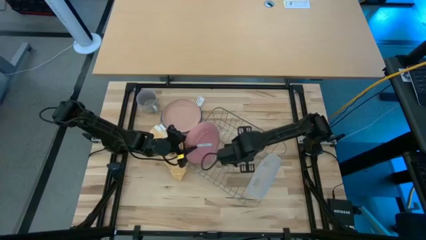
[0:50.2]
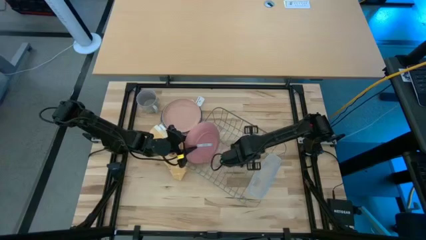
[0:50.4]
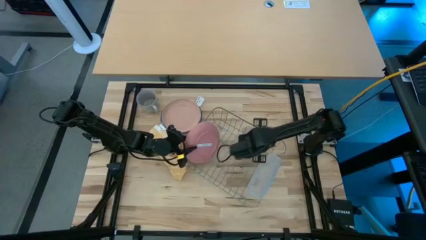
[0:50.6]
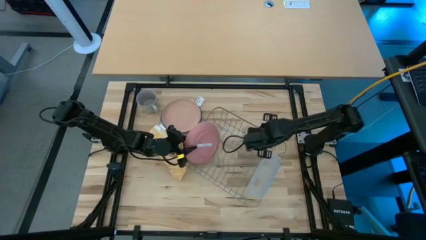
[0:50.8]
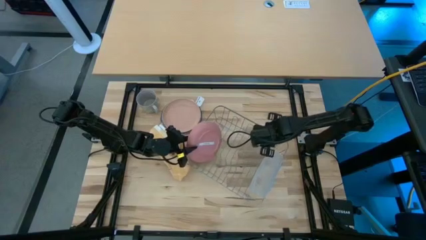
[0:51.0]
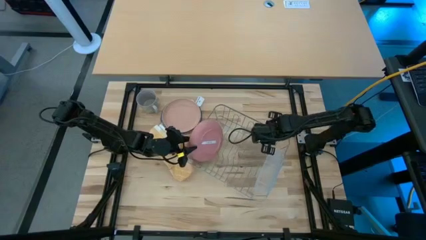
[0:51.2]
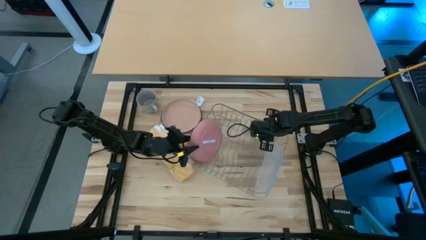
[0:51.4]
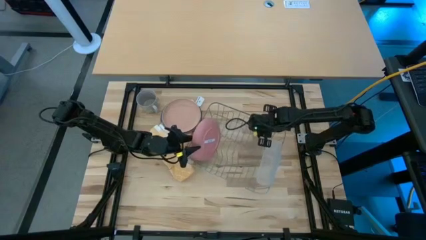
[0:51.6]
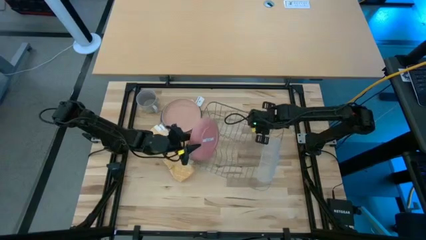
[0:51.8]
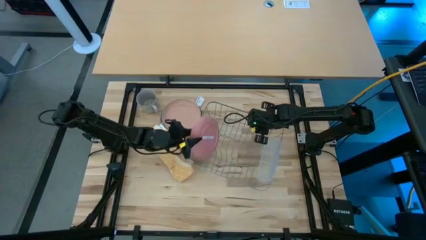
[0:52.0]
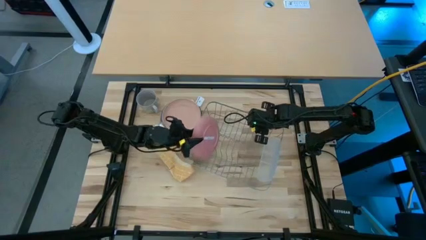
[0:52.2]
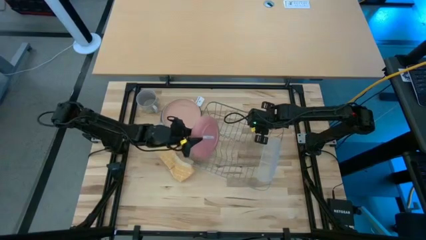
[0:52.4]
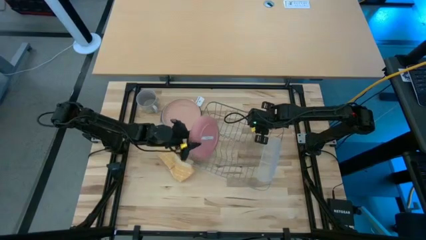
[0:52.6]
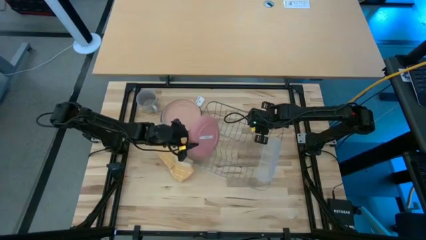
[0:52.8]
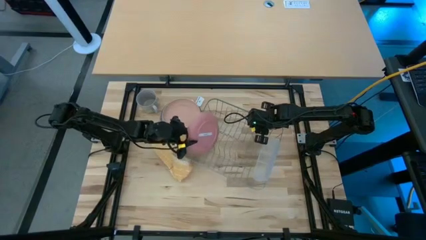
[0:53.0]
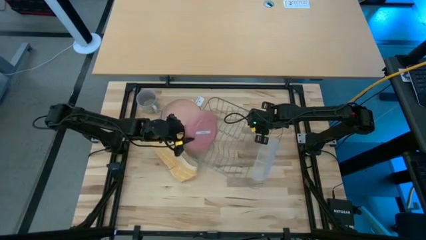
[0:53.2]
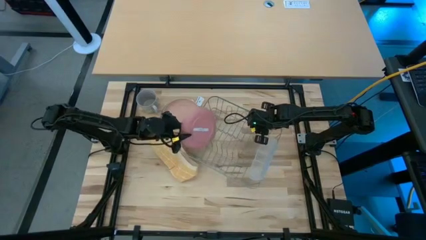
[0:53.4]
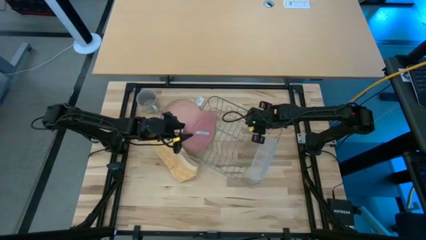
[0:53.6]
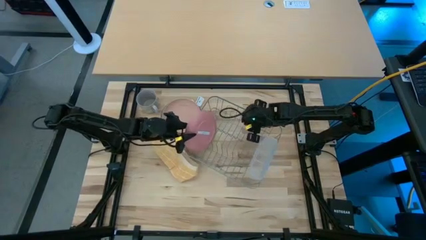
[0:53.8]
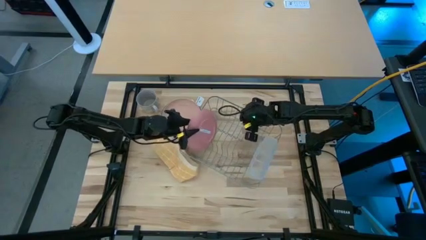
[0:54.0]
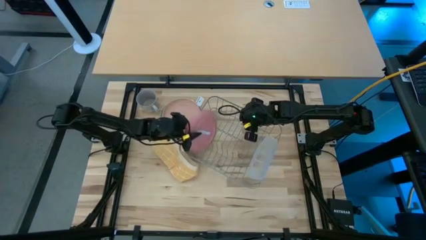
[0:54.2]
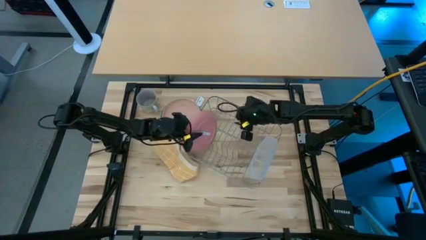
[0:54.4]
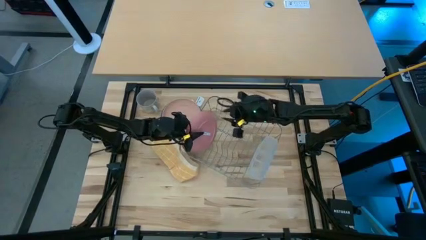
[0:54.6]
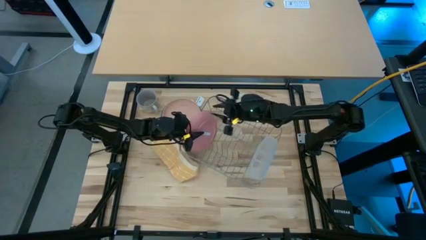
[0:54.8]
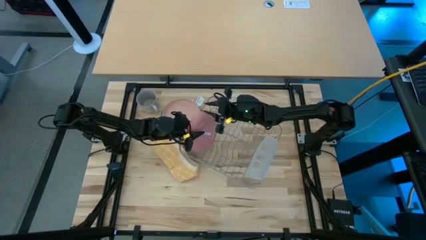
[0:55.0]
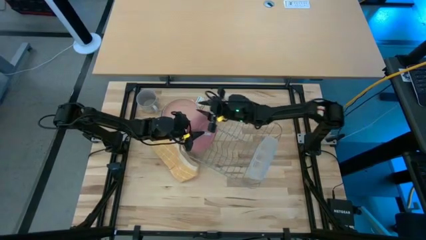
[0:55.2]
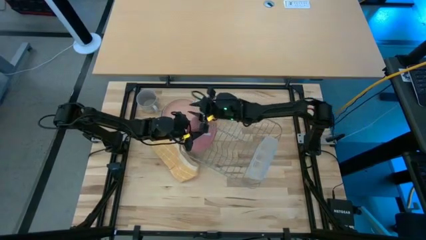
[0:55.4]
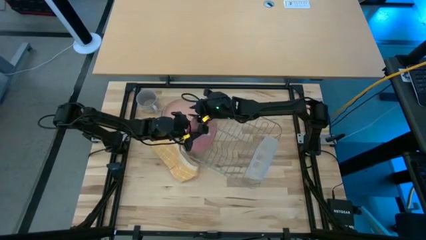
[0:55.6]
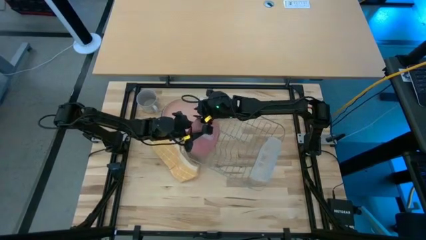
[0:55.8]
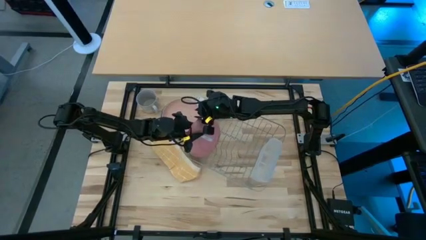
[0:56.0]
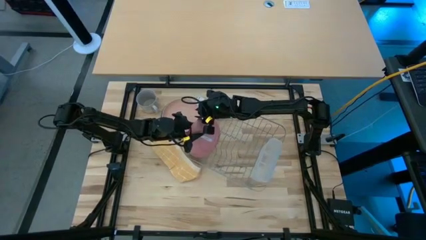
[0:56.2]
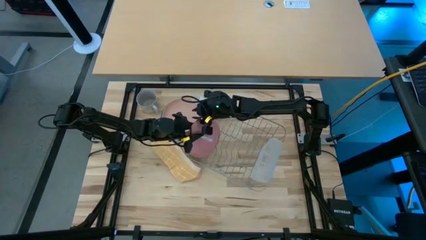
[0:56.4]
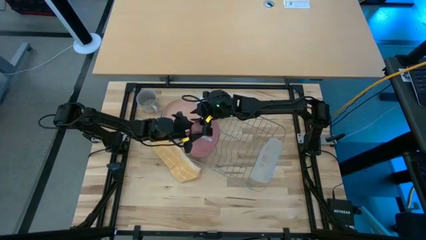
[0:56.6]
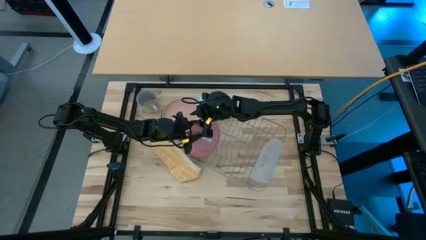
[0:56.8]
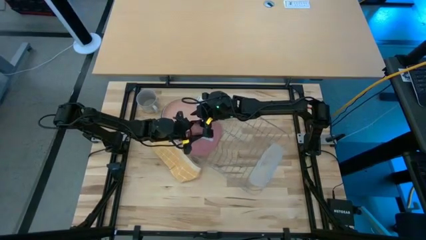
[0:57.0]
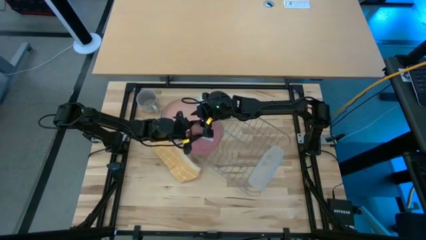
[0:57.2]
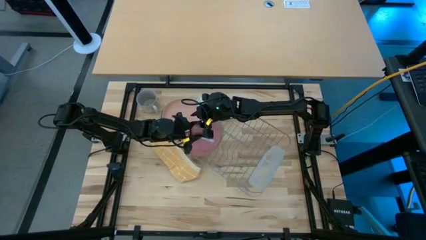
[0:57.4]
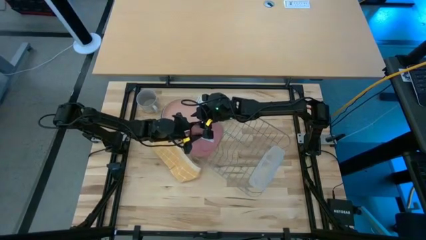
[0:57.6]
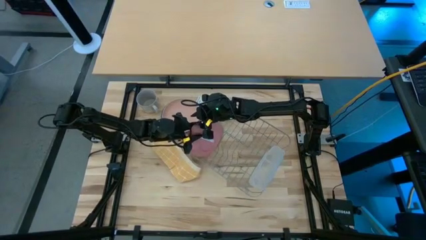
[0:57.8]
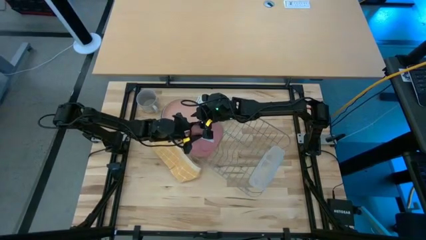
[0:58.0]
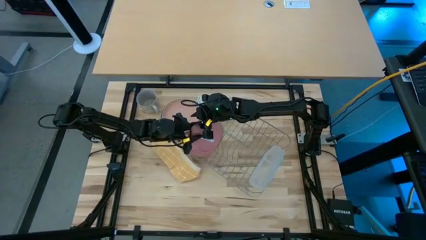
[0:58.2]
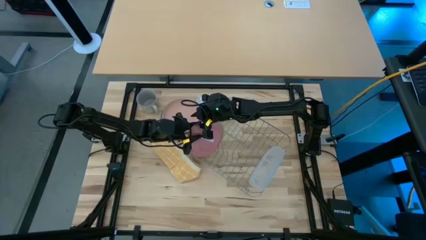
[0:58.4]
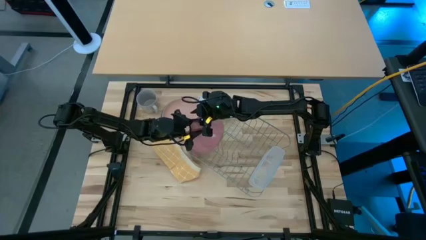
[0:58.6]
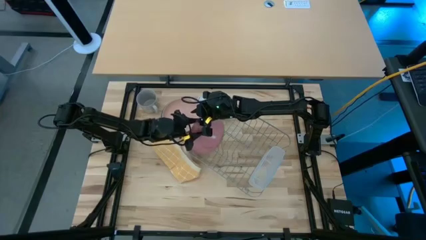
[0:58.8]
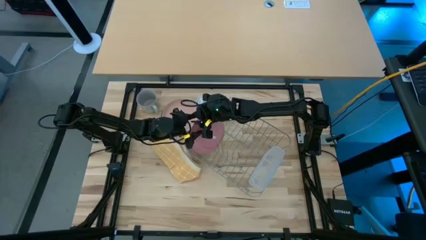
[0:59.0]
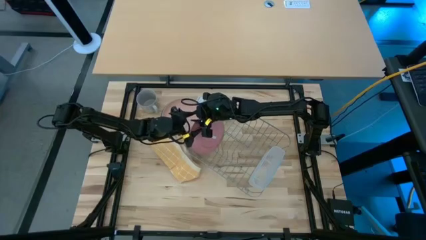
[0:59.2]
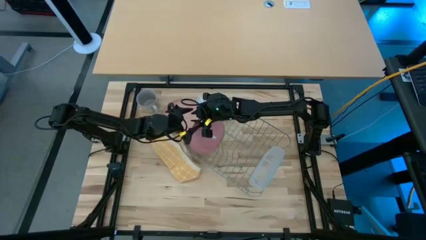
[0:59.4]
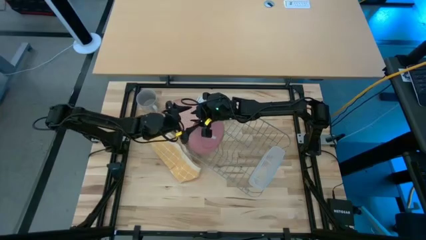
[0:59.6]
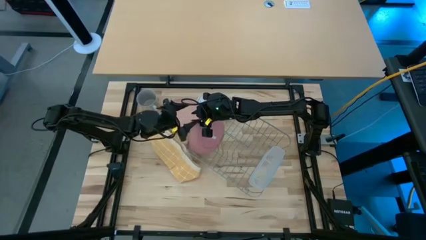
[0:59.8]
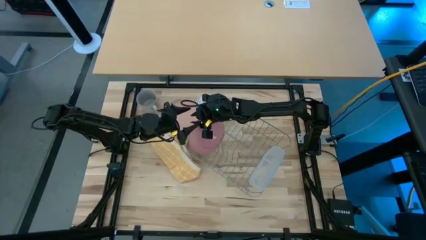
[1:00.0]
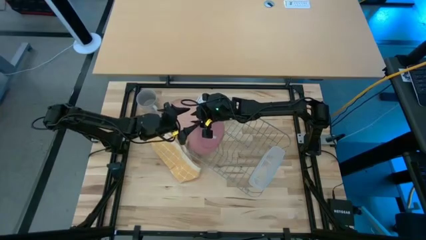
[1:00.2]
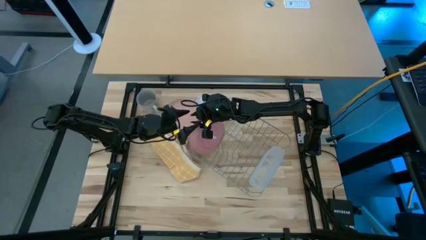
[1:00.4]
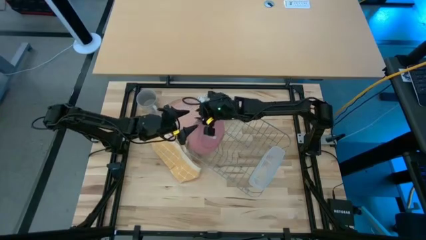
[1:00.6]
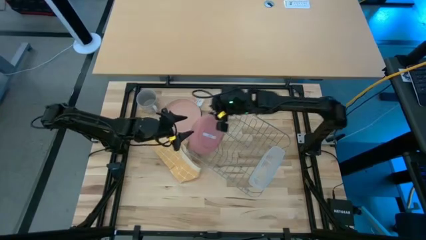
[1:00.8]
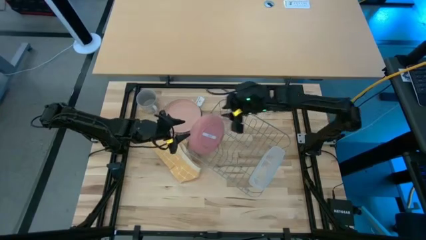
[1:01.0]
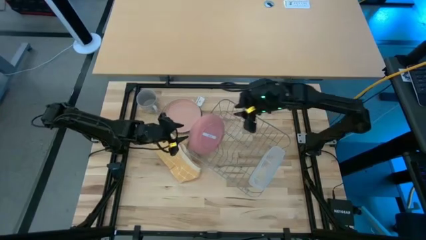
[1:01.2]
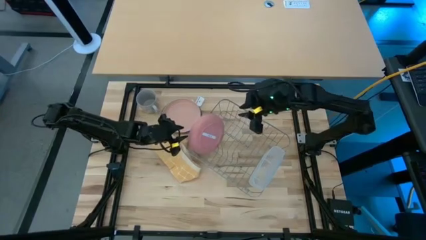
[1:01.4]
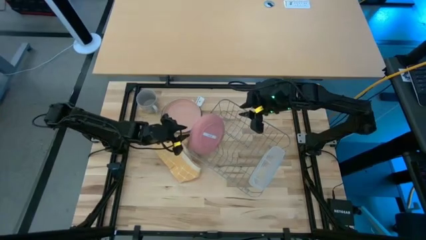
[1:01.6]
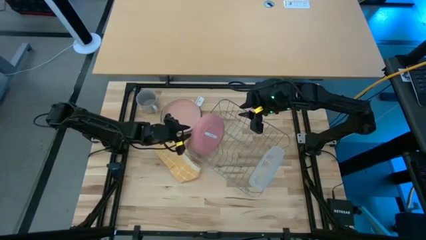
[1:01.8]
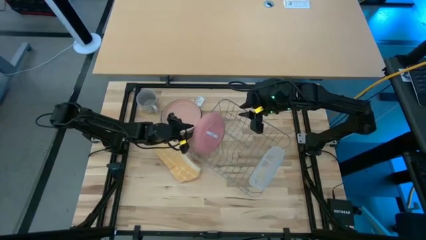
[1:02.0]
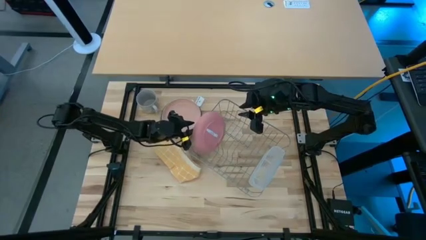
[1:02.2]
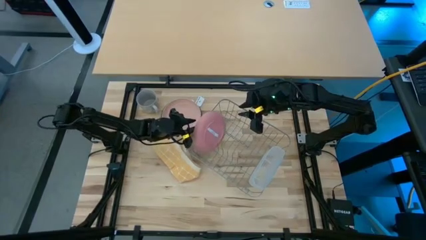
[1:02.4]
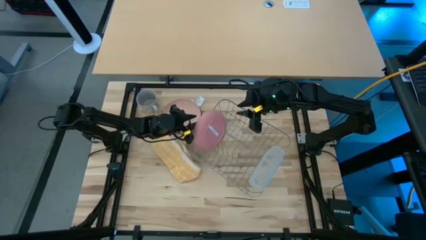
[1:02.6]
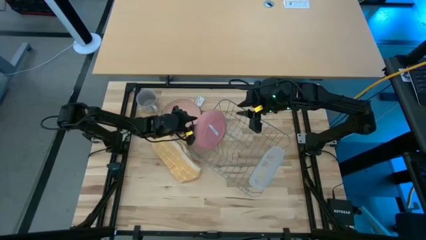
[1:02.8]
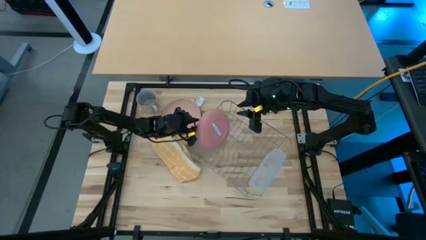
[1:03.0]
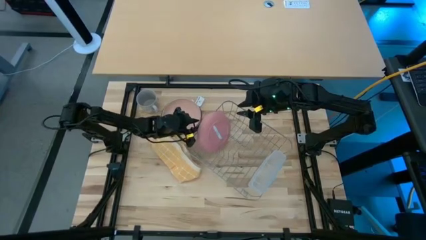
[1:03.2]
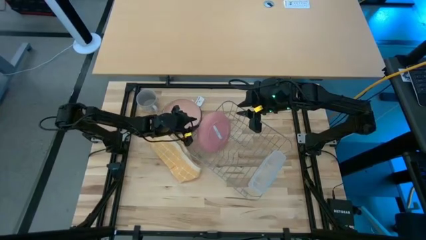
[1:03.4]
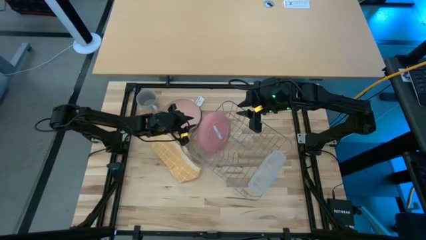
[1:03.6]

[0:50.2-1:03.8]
Task: Sort dishes
Put the pink plate in the dish rack

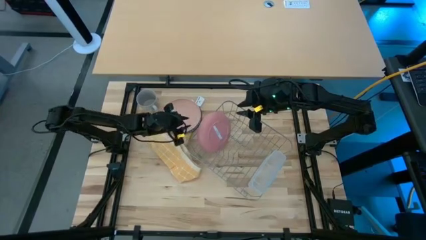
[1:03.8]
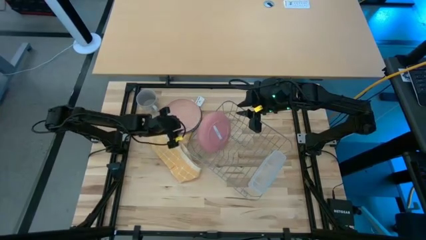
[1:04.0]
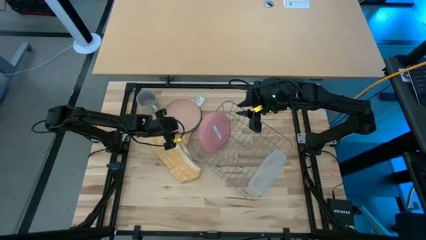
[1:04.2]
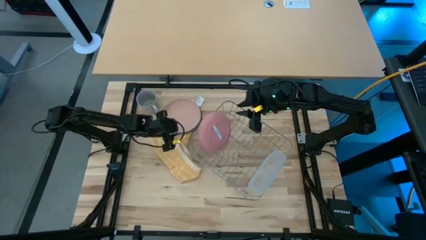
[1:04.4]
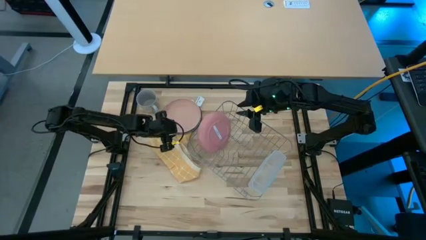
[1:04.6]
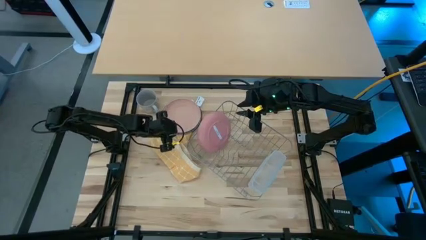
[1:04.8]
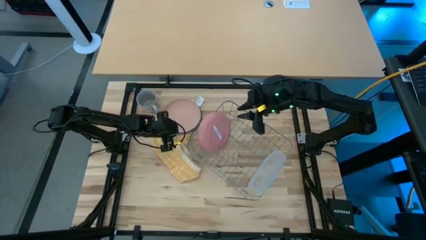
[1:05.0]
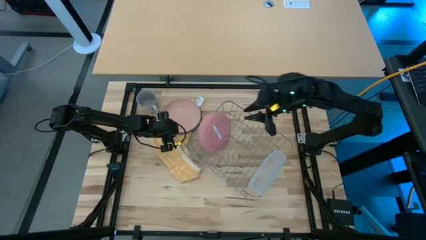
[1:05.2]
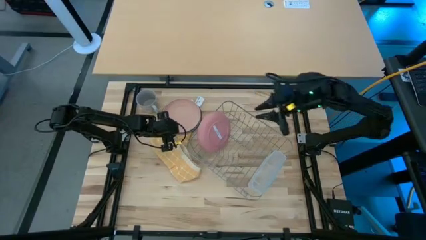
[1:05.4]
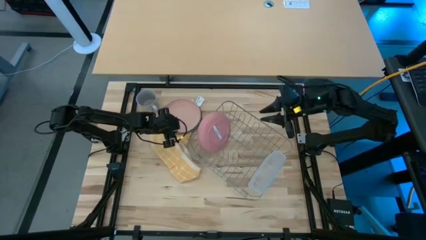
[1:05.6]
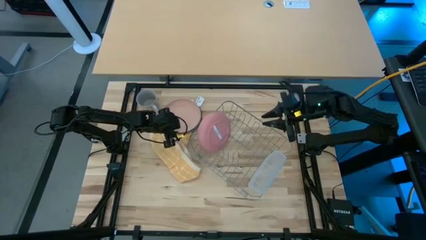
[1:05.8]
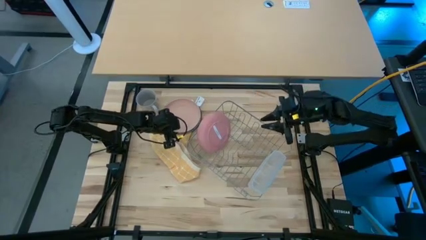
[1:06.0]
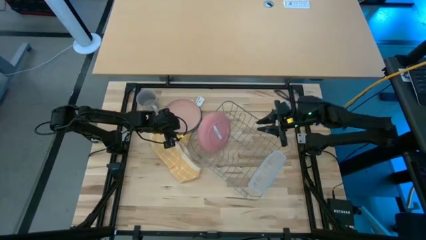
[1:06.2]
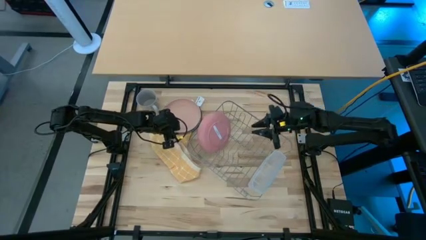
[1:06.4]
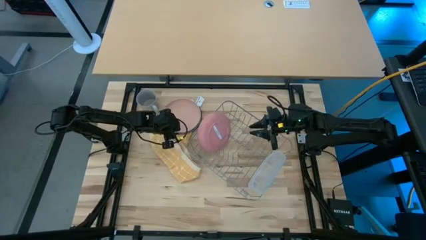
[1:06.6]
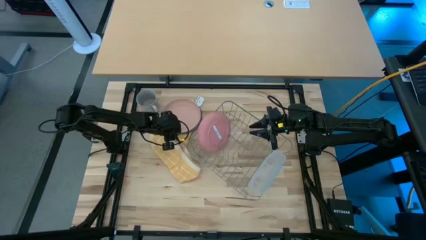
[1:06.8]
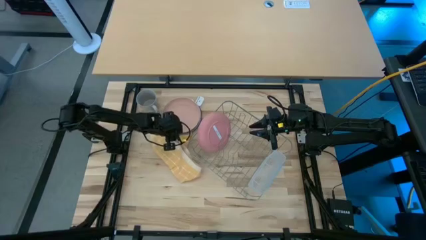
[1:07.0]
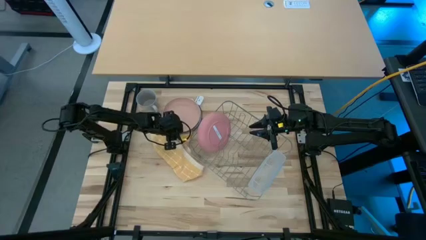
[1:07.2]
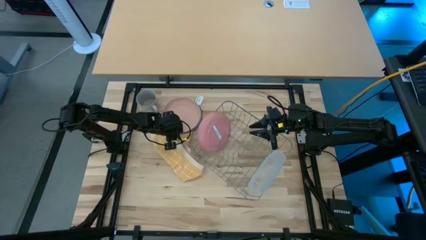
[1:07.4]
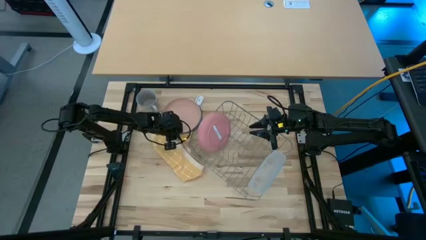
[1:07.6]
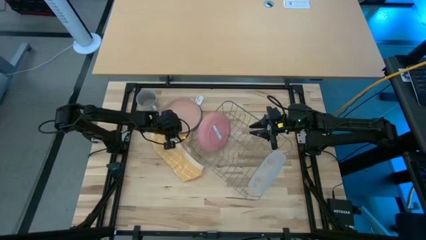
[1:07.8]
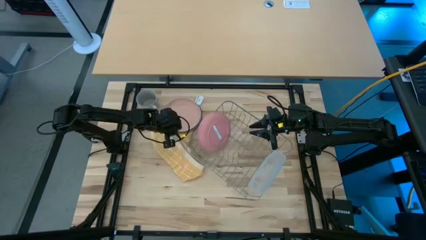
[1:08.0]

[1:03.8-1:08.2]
Put the light orange plate in the dish rack
